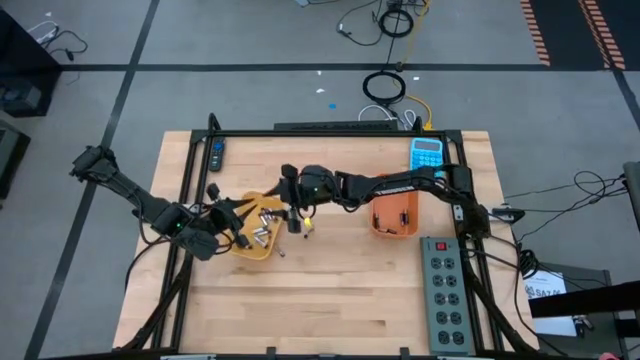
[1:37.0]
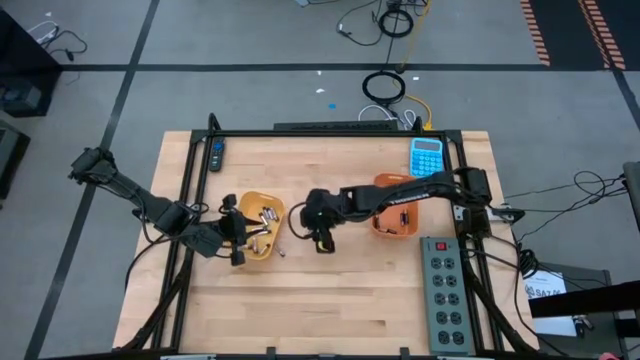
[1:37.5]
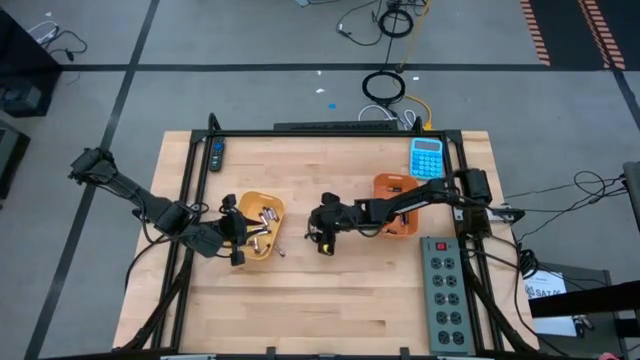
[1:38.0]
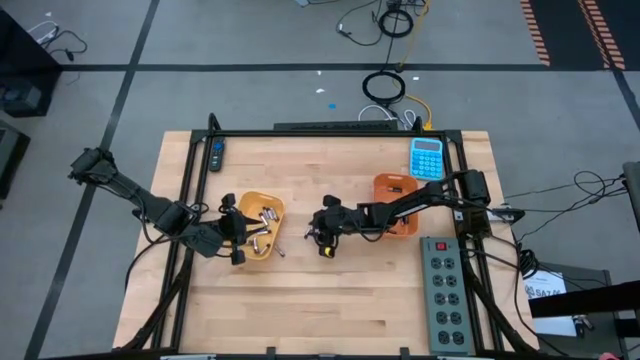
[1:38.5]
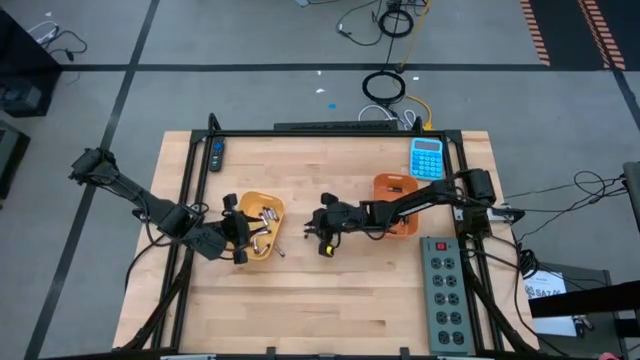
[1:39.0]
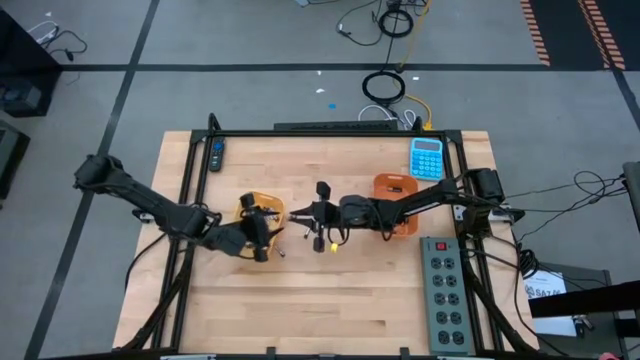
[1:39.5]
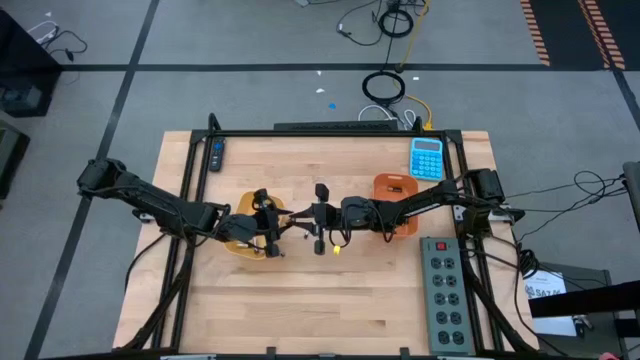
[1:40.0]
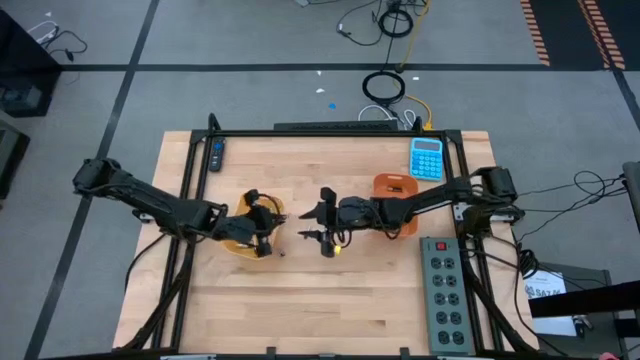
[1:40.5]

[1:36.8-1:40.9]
Task: Sort batteries
Put the silver battery into the yellow bin

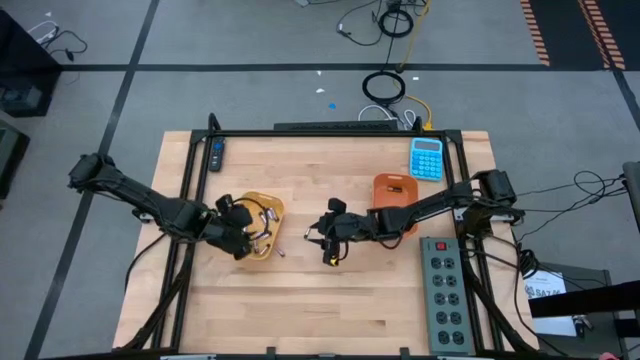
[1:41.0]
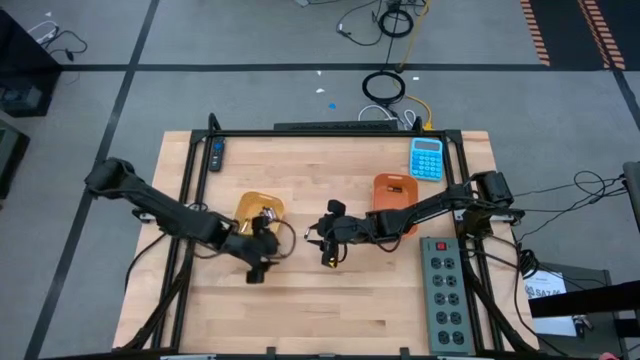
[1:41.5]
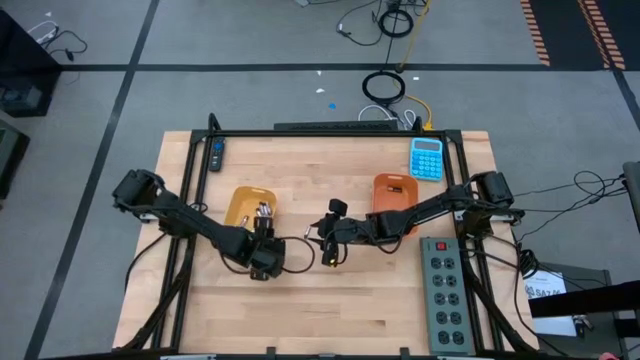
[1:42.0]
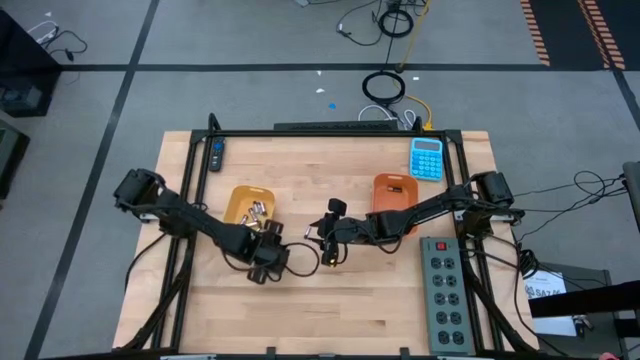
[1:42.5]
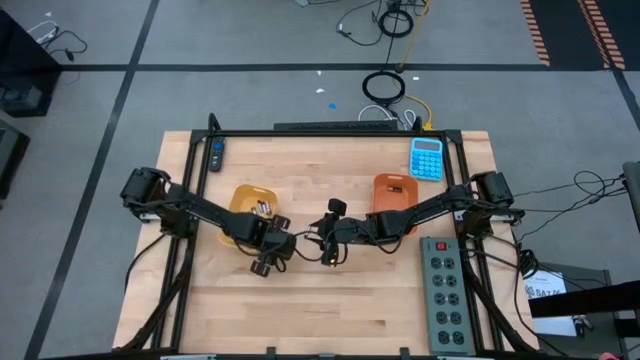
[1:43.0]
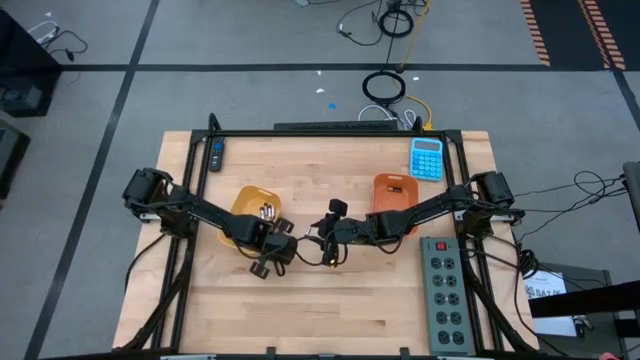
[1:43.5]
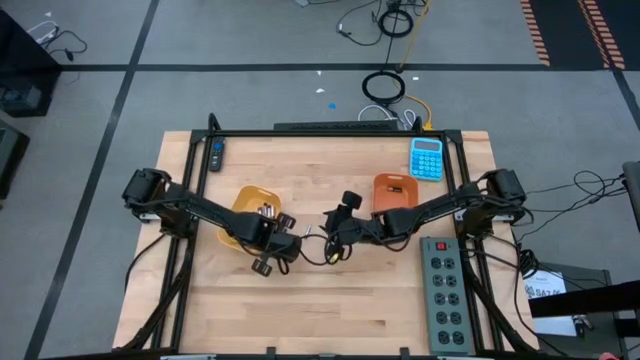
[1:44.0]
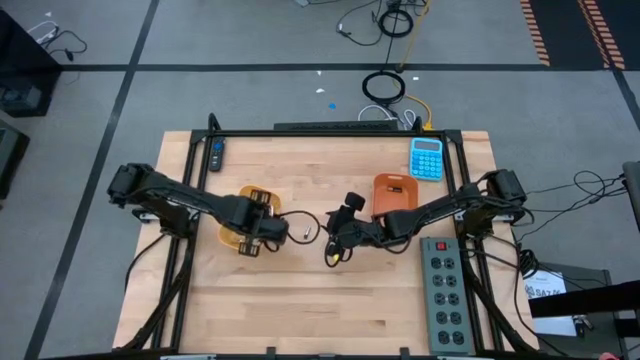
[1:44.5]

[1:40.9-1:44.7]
Put the silver battery into the yellow bin

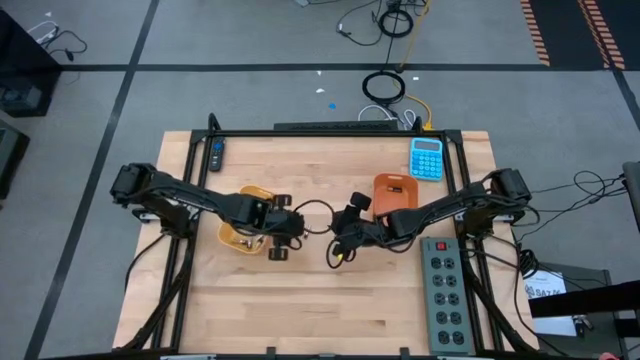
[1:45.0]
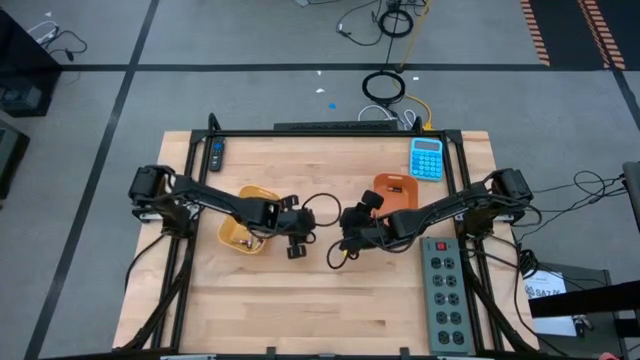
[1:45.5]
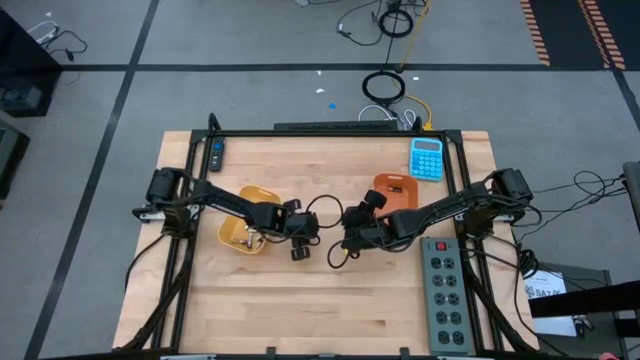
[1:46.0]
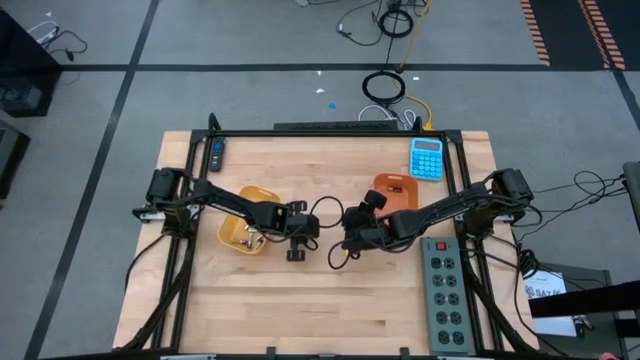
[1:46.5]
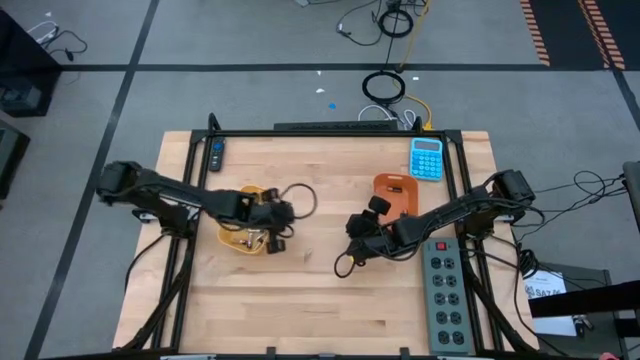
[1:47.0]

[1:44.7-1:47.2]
Put the silver battery into the yellow bin

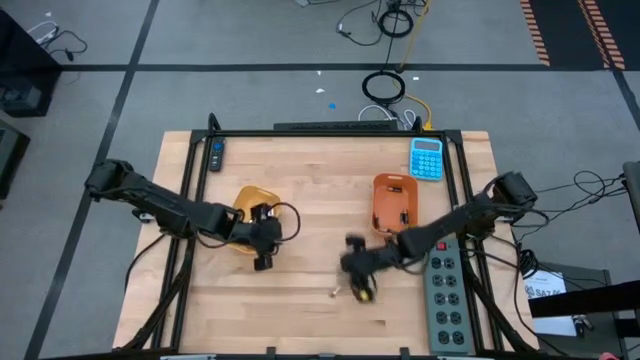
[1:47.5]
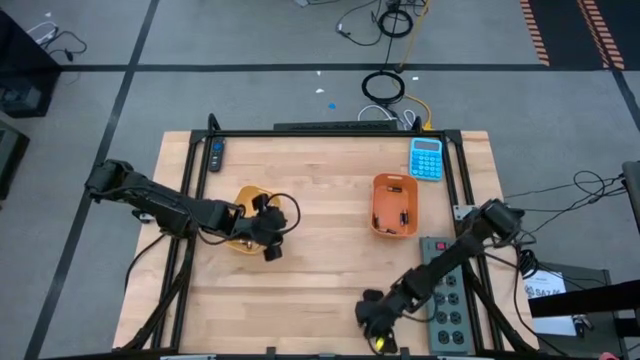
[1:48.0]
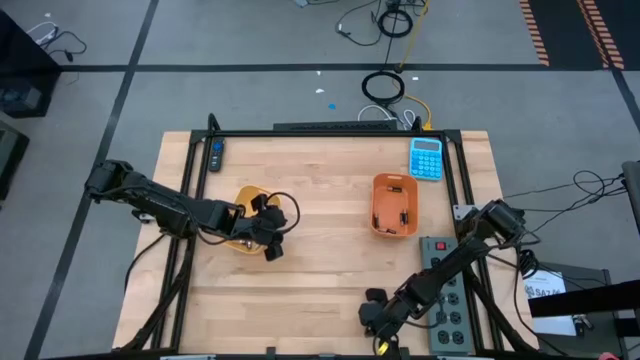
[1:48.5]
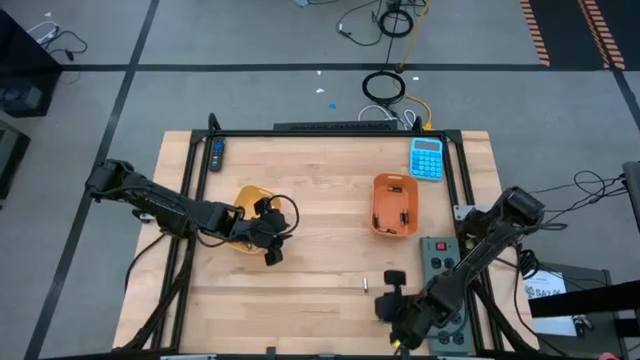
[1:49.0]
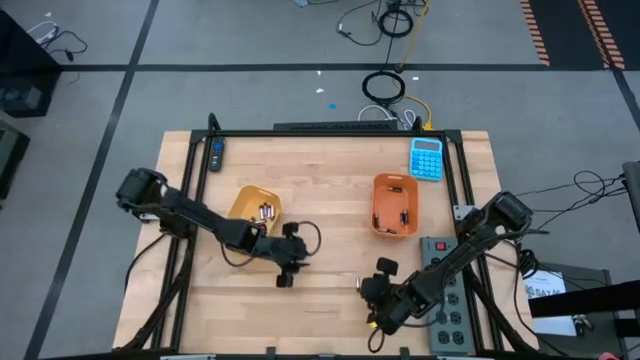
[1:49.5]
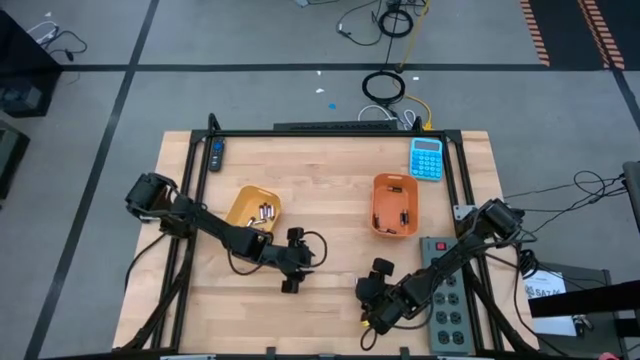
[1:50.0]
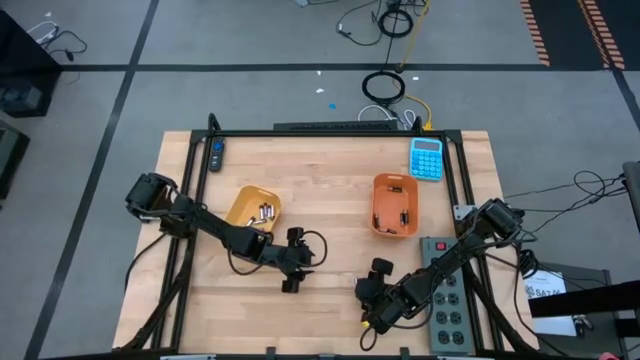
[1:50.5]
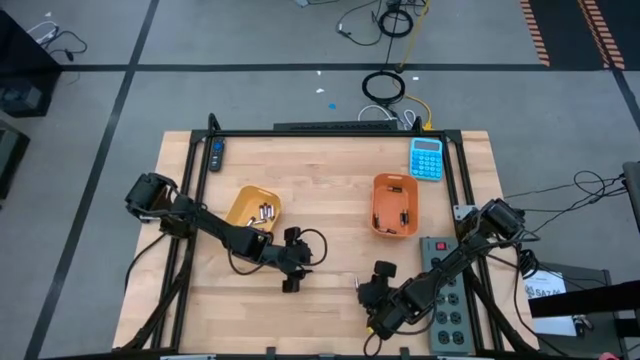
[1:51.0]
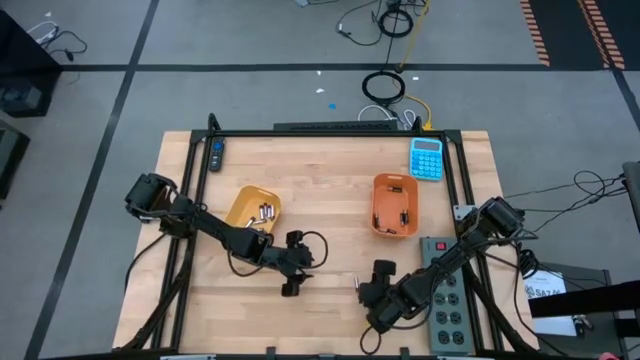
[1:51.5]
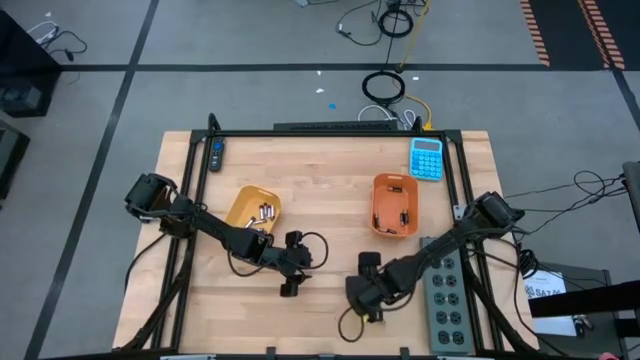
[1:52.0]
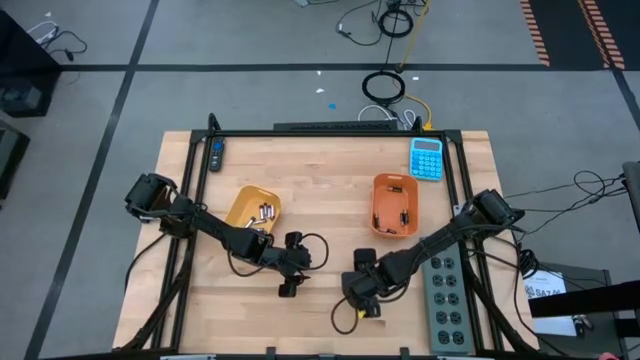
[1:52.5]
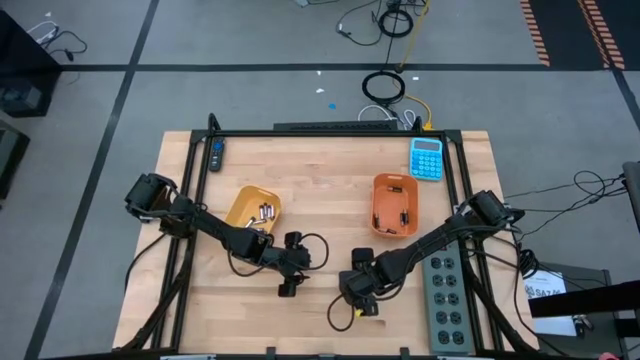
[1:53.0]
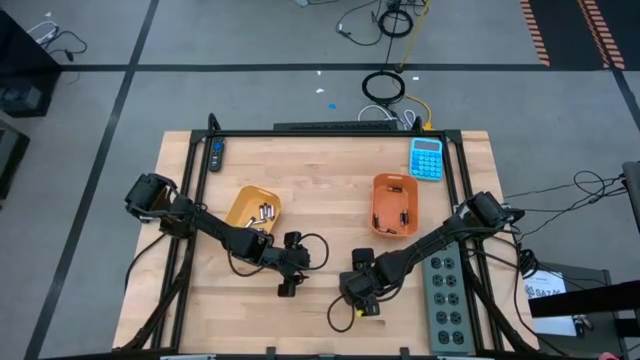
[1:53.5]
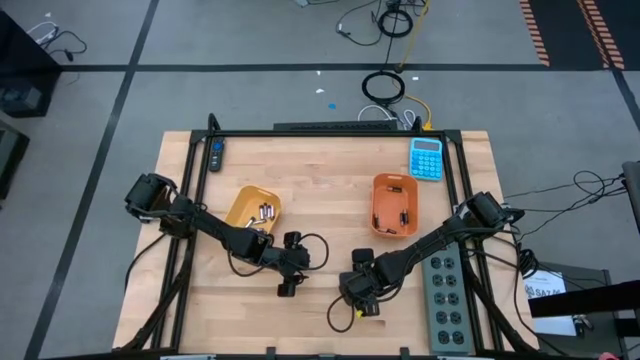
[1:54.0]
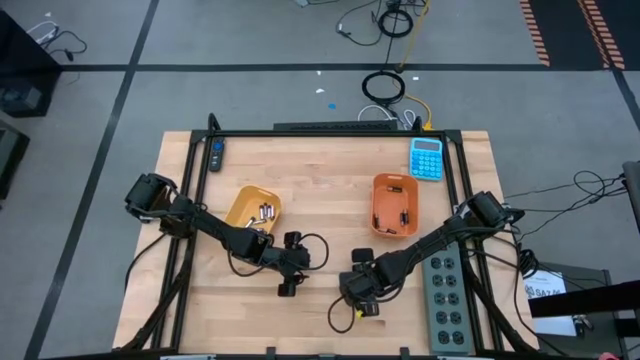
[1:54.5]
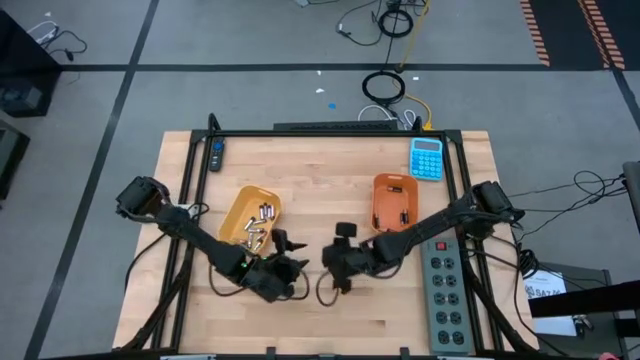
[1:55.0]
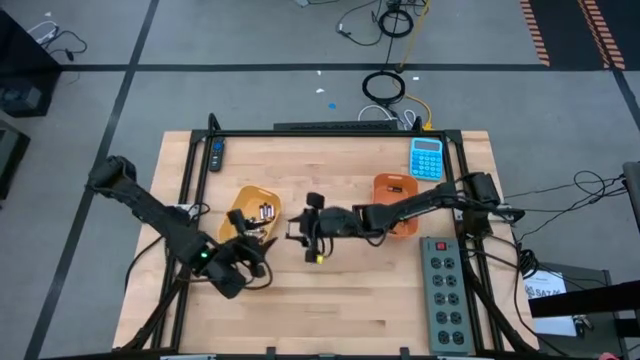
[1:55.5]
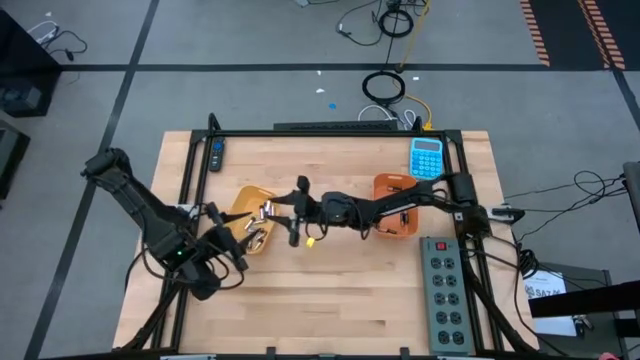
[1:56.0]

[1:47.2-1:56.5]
Put the silver battery into the yellow bin

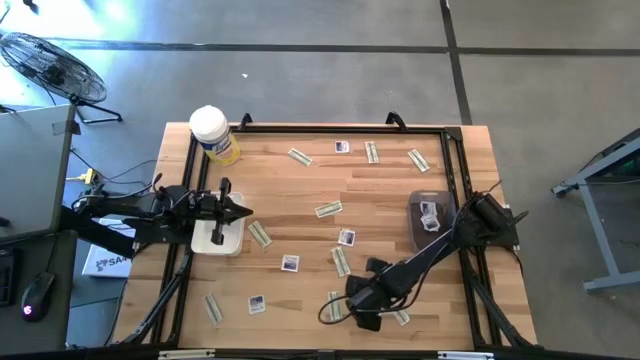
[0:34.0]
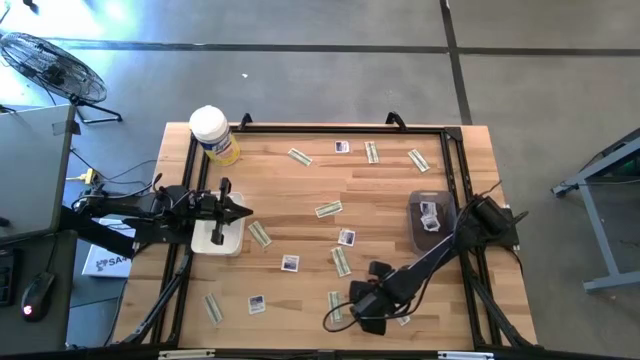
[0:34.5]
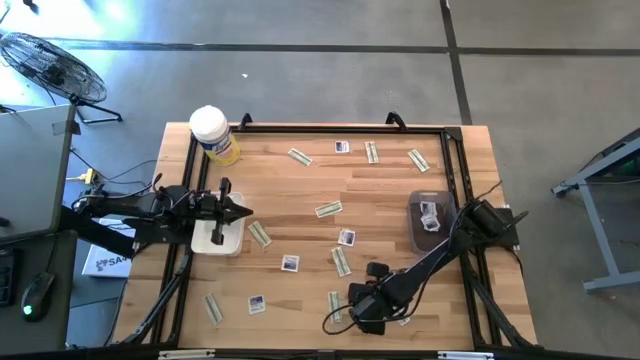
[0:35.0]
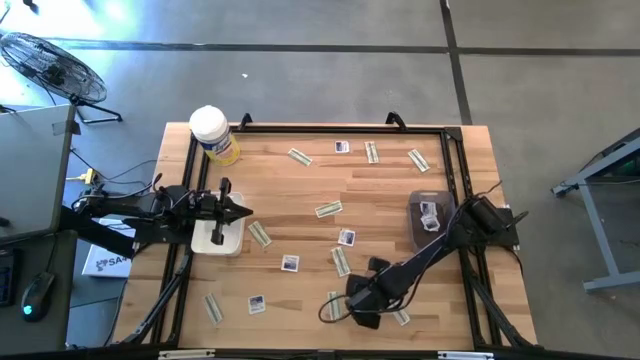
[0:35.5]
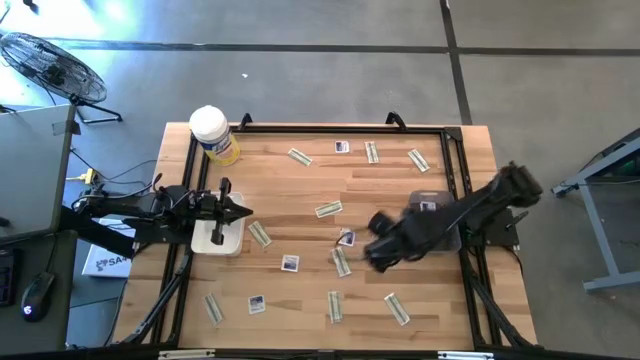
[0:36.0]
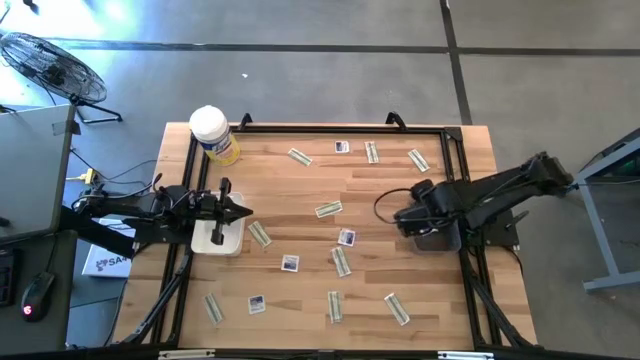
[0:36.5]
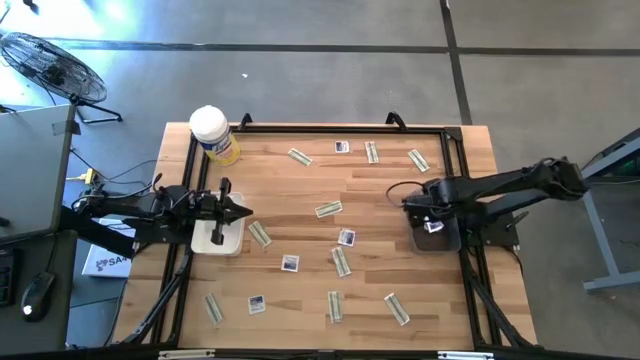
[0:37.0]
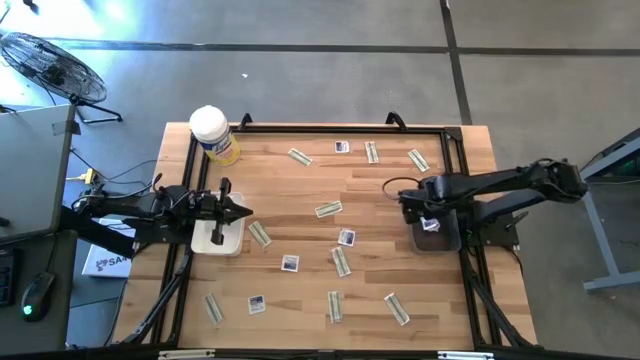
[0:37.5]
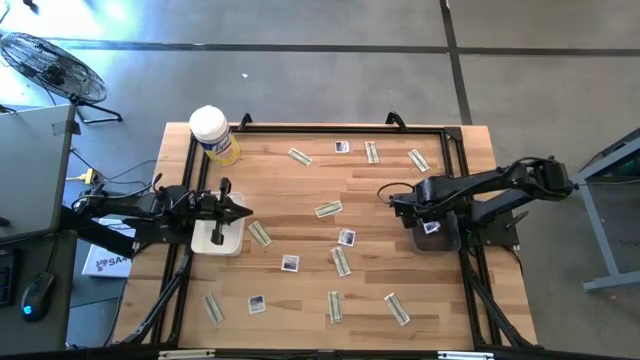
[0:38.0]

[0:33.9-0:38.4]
Task: Pick & Place First Aid Supplies
Put the blue alcohol pad into the black bin
